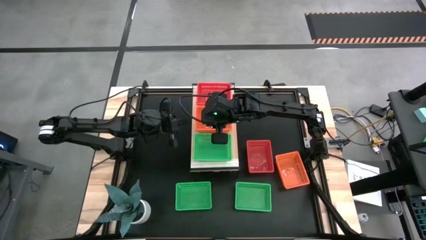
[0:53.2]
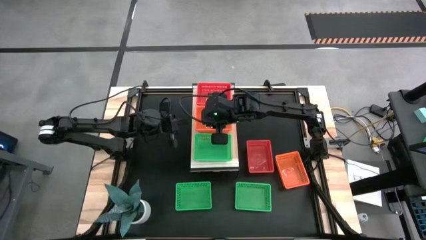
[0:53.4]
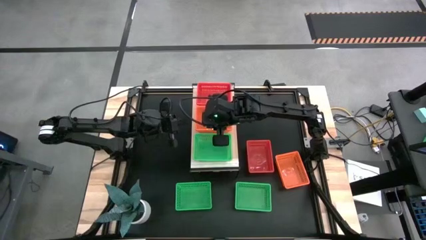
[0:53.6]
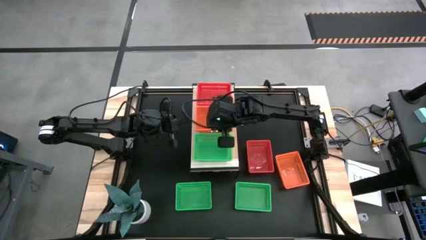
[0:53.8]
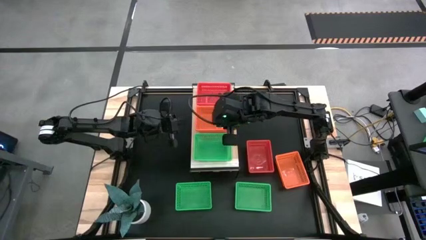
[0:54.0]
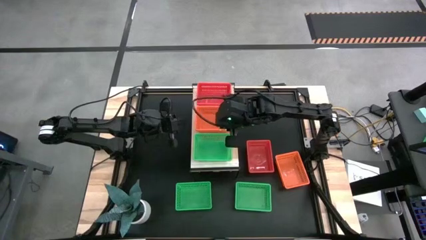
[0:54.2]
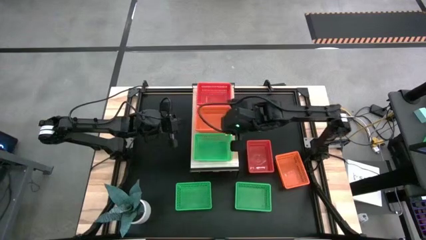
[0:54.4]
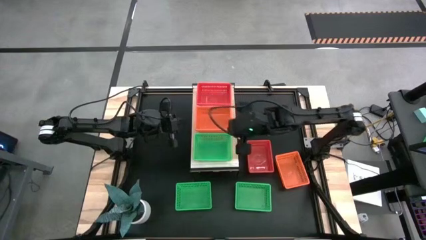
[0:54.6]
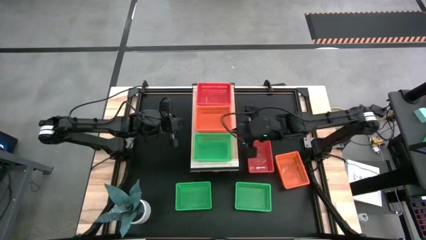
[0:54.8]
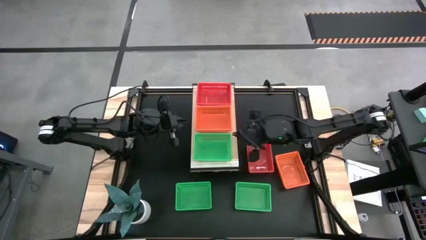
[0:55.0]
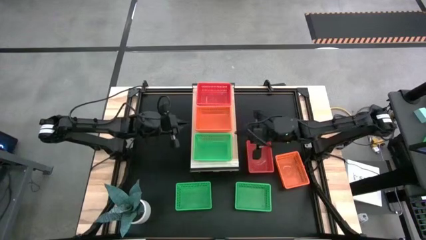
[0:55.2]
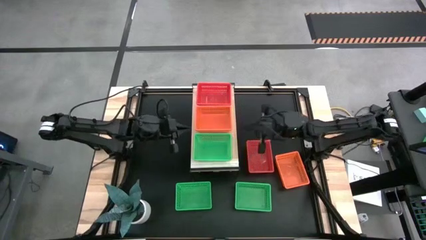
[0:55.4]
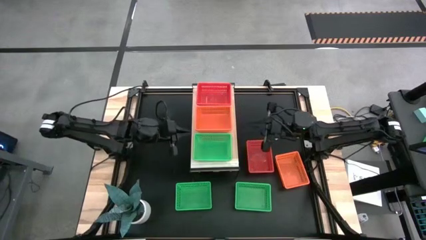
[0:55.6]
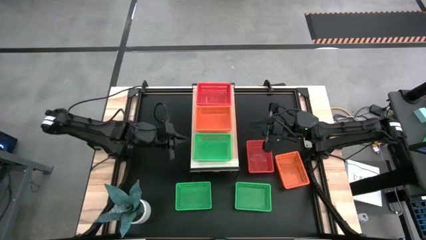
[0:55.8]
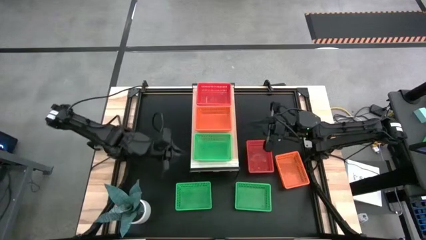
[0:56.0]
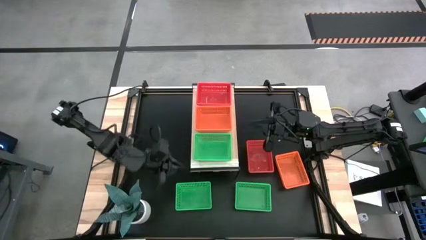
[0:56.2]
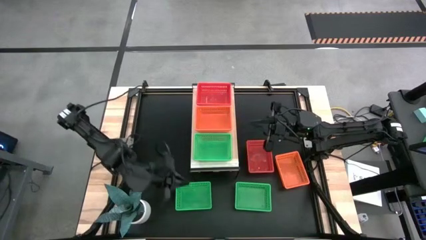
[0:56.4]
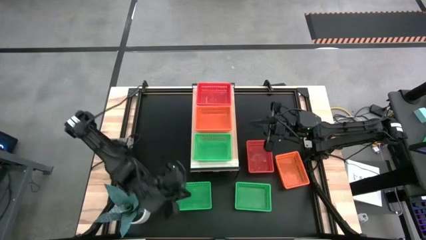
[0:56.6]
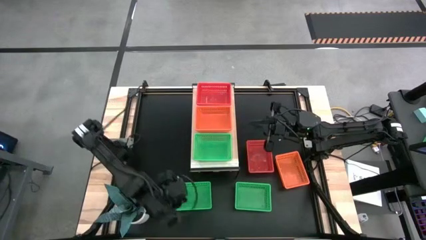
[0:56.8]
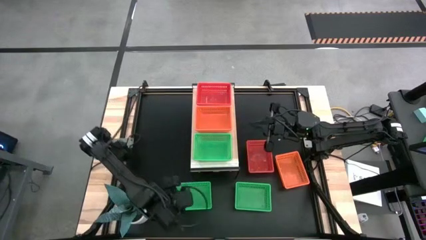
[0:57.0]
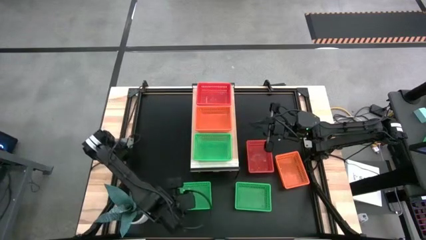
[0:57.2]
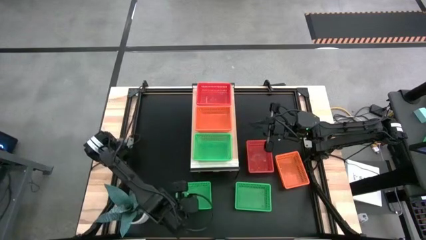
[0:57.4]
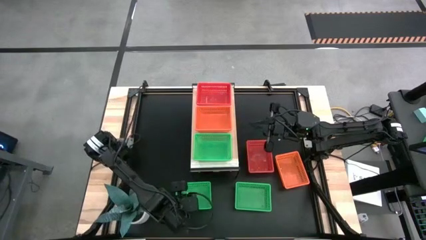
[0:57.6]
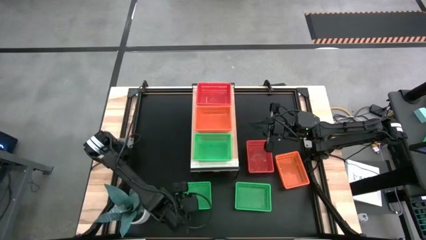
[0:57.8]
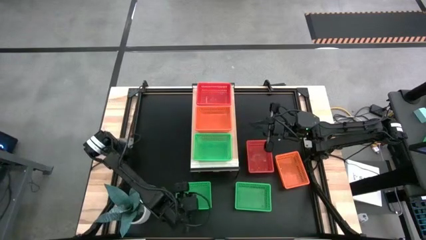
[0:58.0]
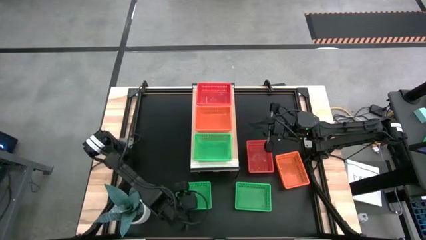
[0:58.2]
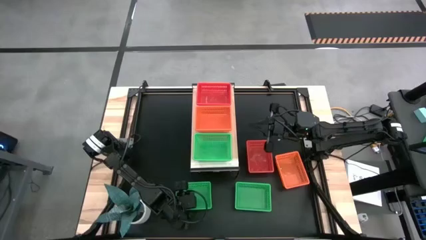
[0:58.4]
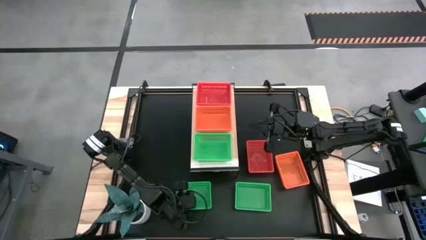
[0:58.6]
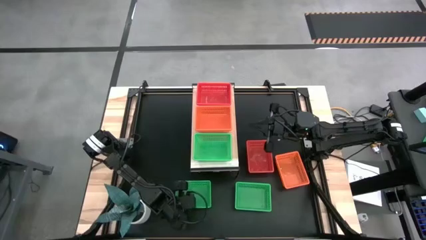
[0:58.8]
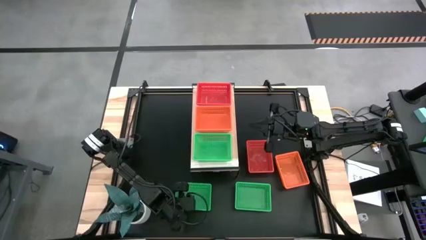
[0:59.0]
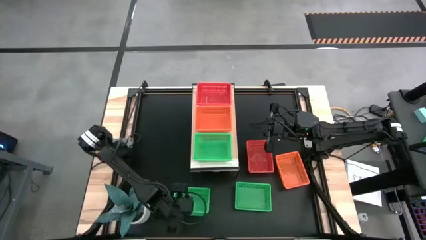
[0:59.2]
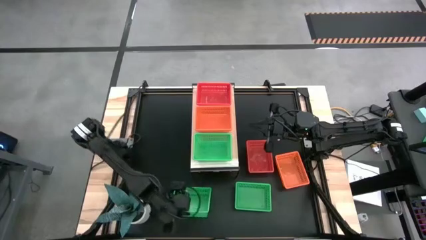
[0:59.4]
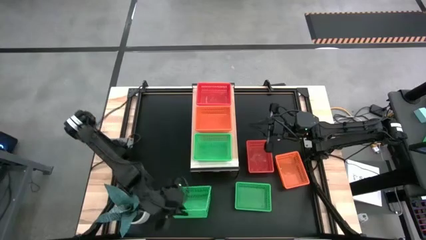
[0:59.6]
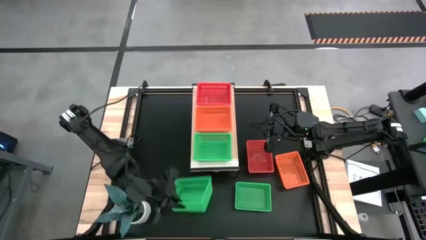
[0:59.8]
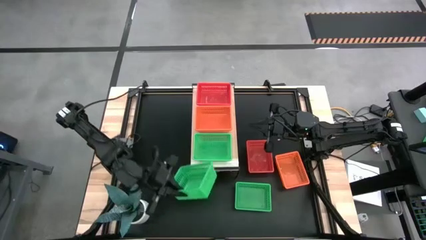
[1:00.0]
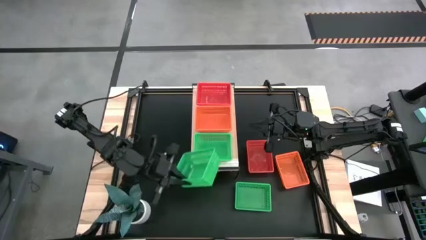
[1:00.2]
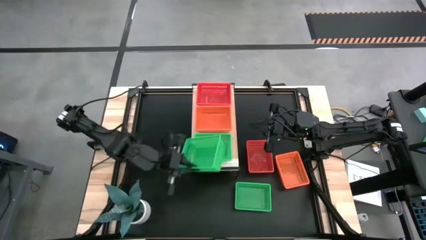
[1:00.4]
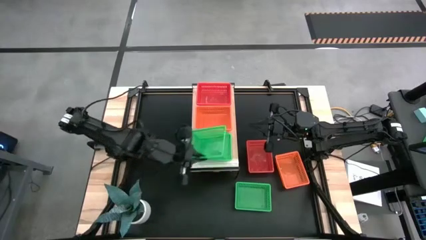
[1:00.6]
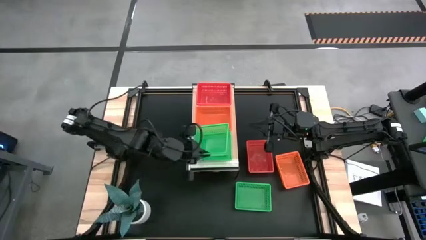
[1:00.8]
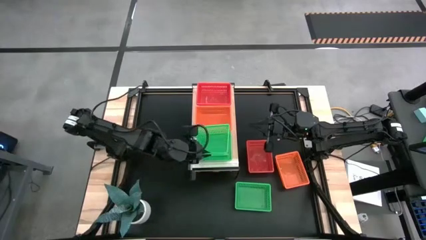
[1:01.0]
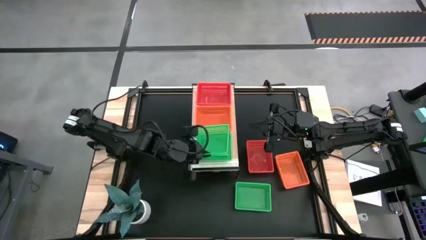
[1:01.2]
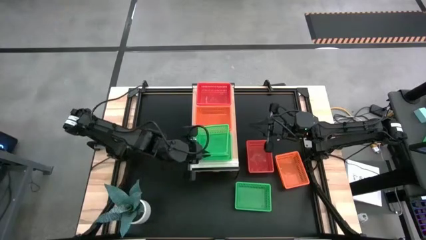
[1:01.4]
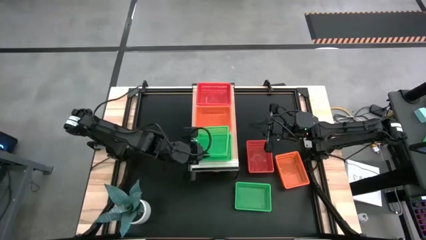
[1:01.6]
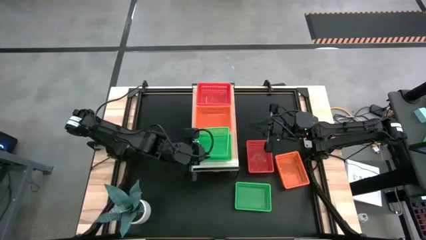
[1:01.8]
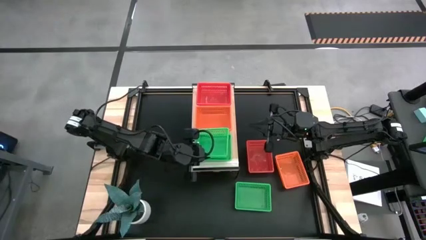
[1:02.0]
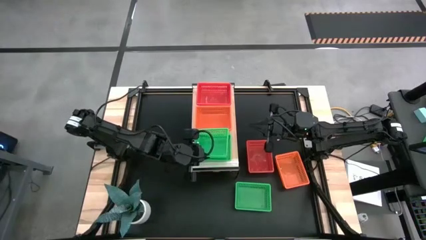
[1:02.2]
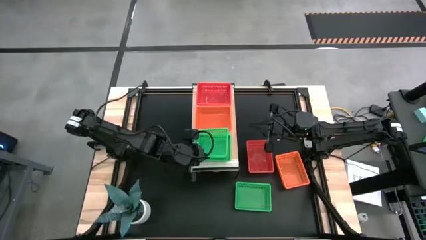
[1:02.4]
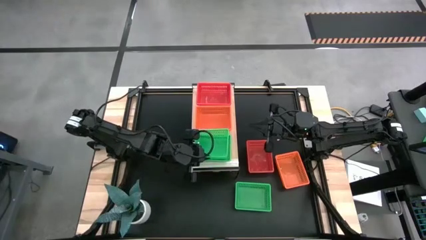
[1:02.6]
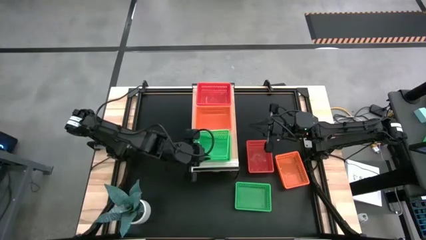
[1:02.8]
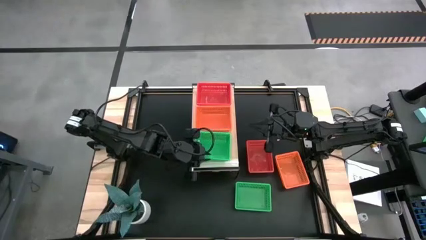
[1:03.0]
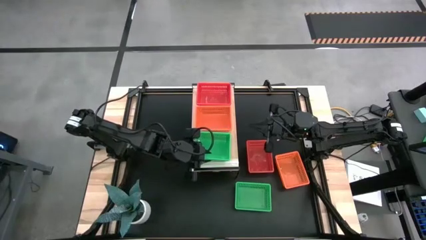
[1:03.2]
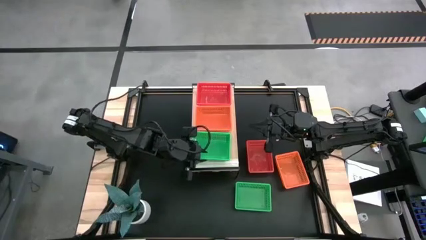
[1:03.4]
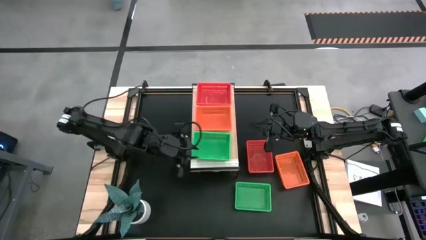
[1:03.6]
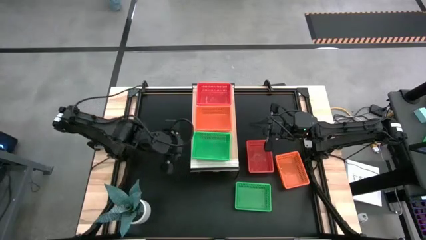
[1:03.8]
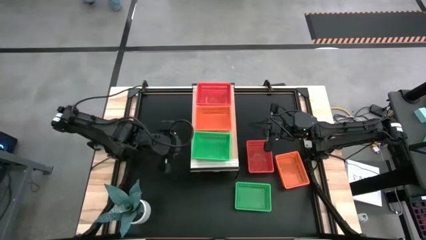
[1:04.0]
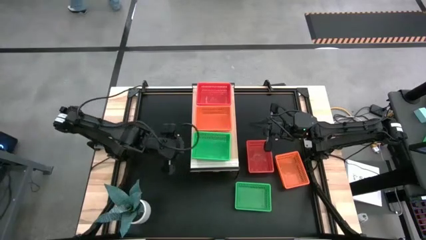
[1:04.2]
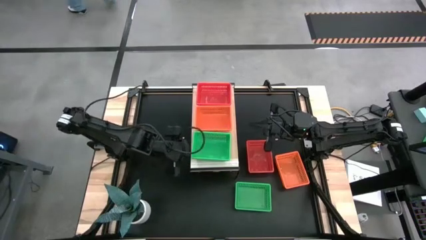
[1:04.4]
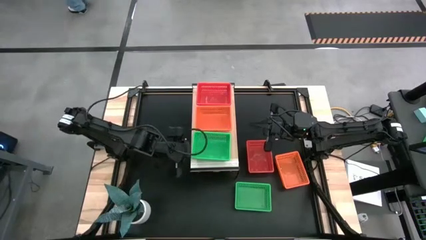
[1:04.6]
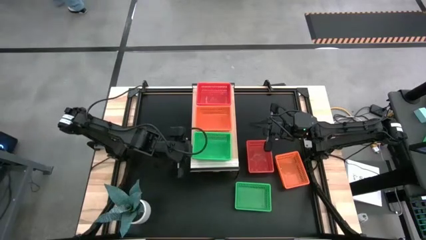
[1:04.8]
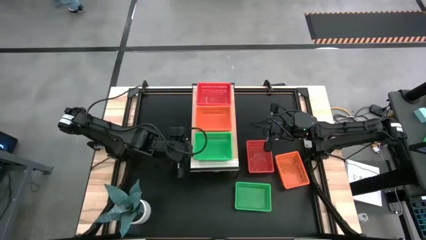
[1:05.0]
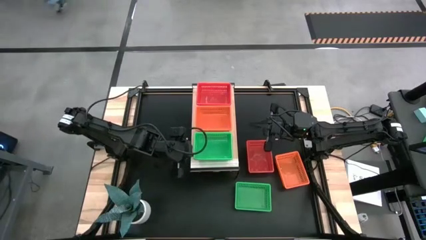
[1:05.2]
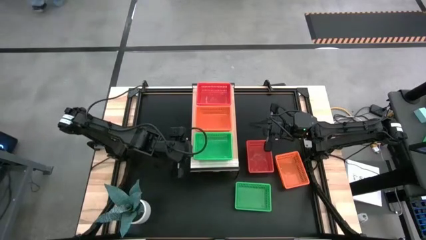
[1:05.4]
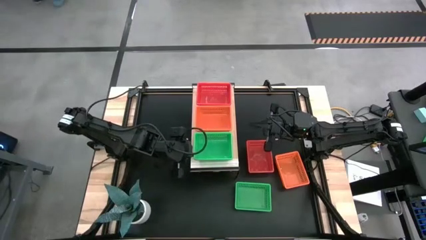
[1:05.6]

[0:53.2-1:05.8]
Task: Stack baskets on shelf by color
Stack the left green bin on the green bin on the shelf
